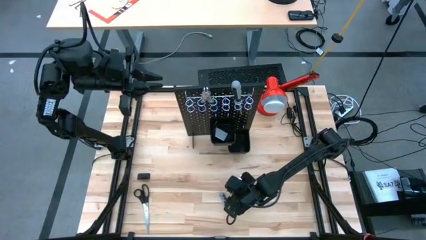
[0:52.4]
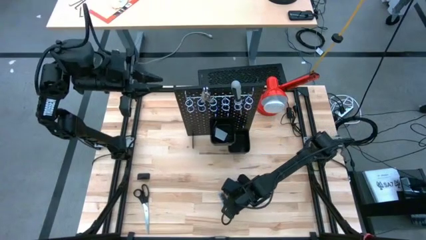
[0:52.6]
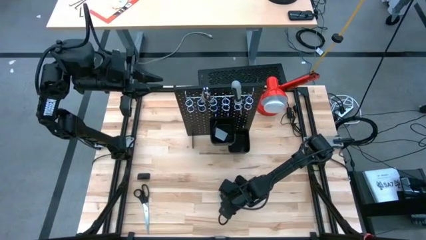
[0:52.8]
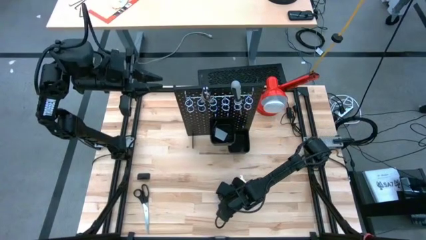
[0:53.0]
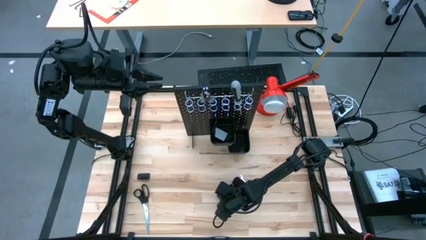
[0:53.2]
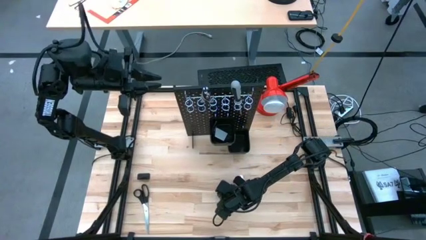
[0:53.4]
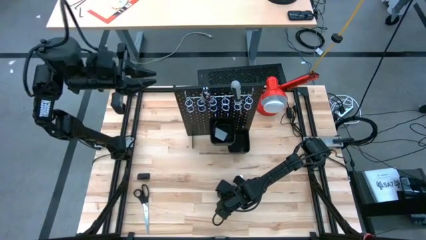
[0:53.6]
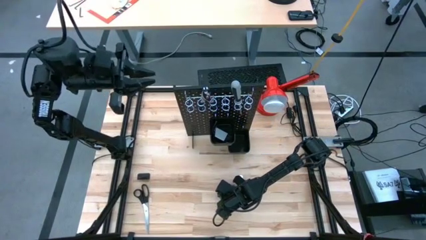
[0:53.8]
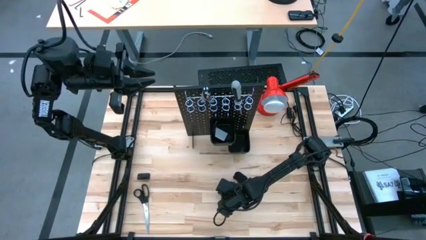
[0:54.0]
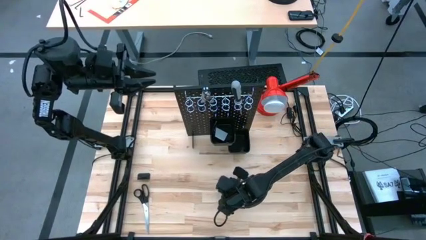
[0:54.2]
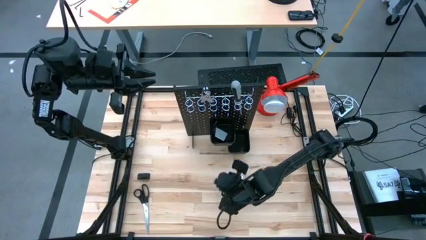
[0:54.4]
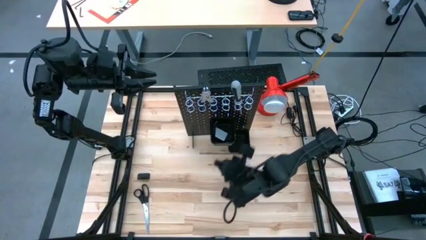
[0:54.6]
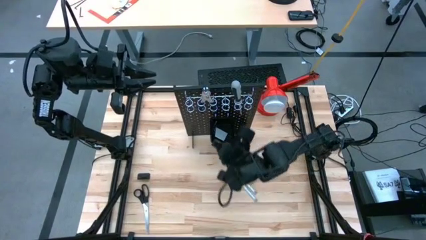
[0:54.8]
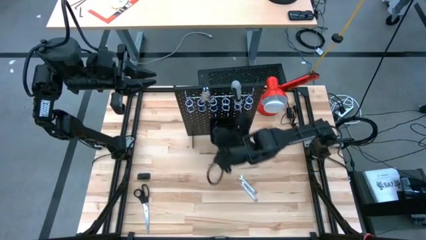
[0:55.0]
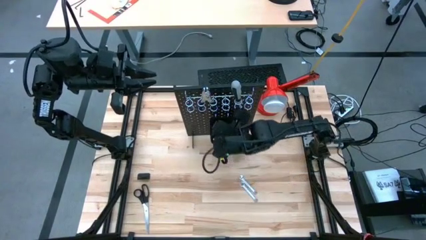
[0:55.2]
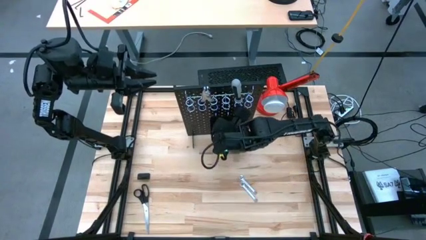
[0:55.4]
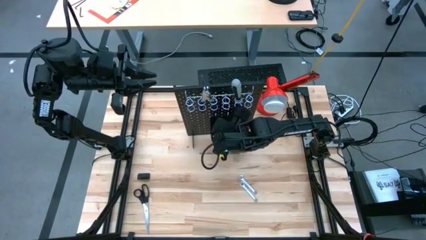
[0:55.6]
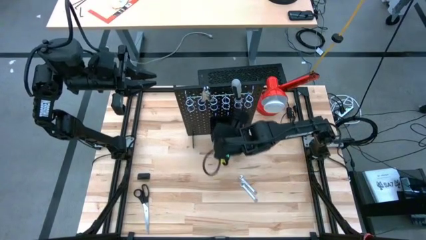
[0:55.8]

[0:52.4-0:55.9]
Task: Hang tools onto peg board
Put the whetstone into the black bin on the pegboard

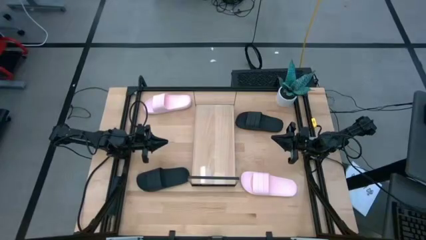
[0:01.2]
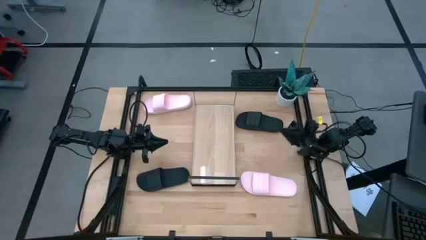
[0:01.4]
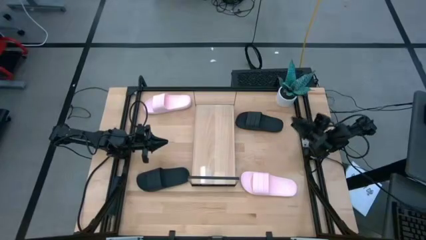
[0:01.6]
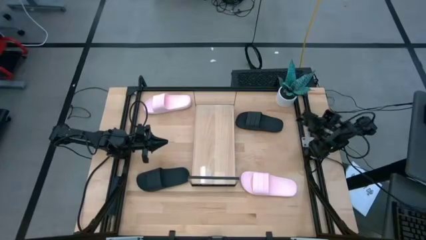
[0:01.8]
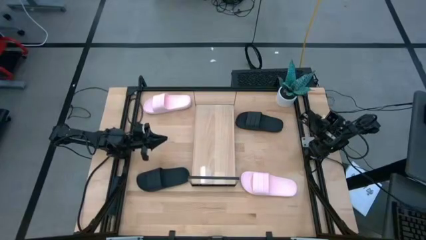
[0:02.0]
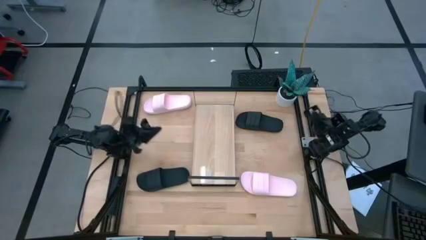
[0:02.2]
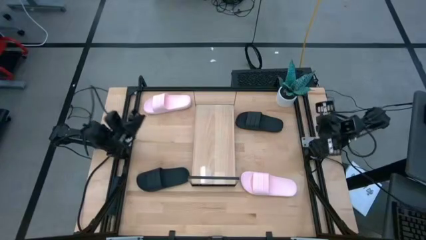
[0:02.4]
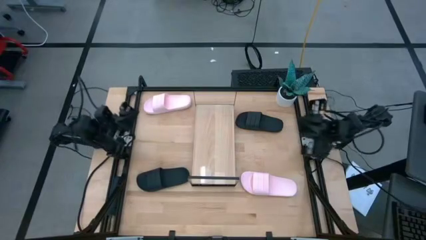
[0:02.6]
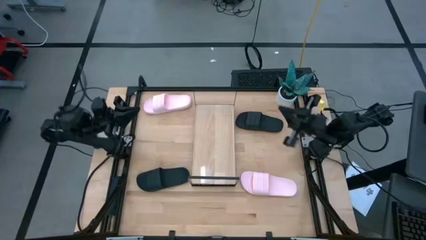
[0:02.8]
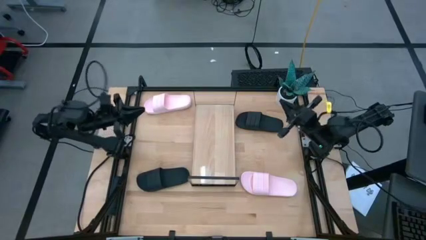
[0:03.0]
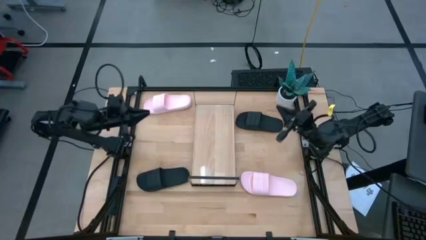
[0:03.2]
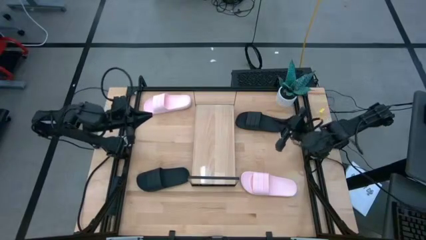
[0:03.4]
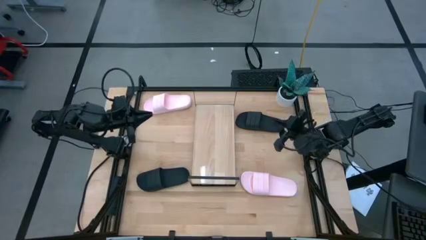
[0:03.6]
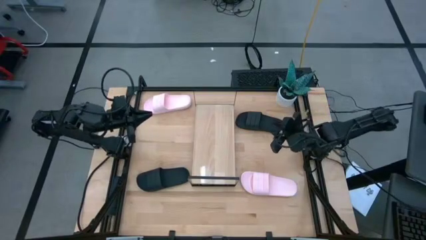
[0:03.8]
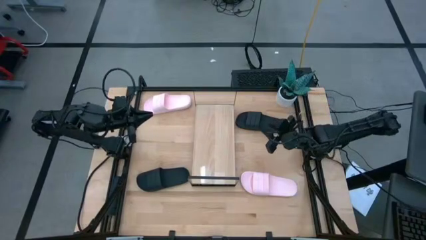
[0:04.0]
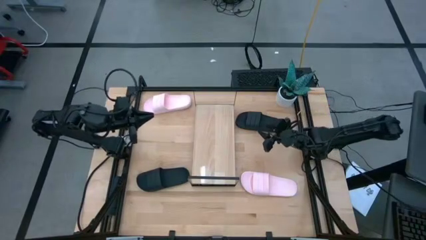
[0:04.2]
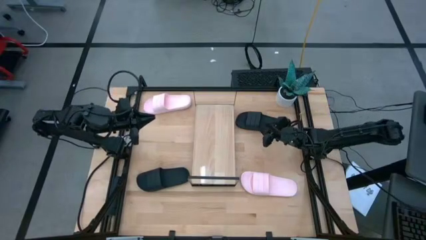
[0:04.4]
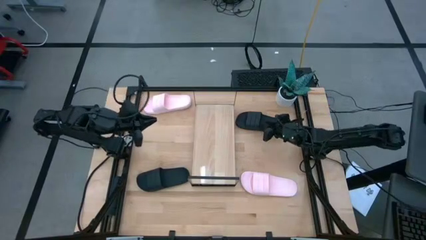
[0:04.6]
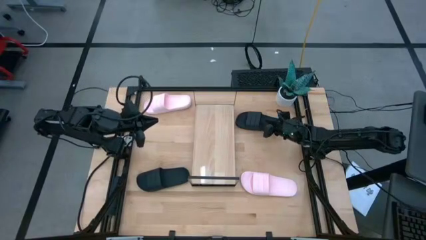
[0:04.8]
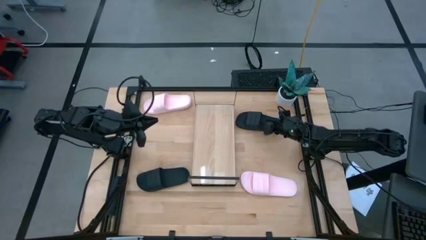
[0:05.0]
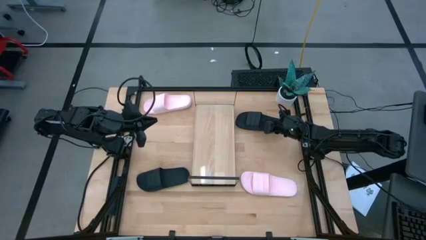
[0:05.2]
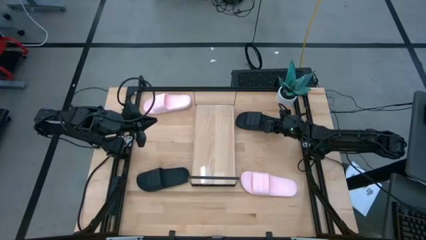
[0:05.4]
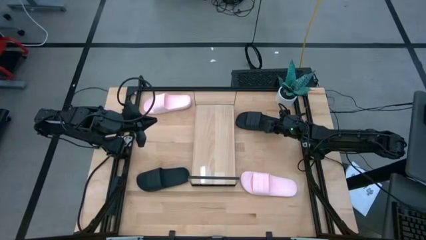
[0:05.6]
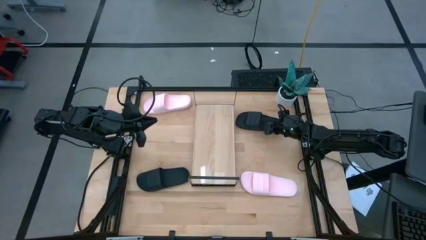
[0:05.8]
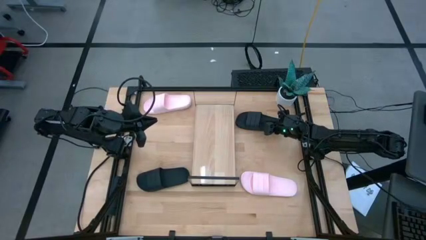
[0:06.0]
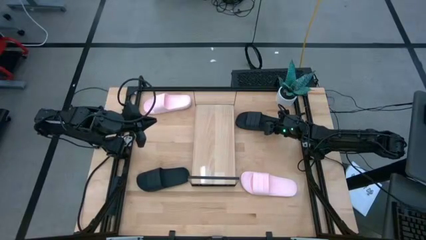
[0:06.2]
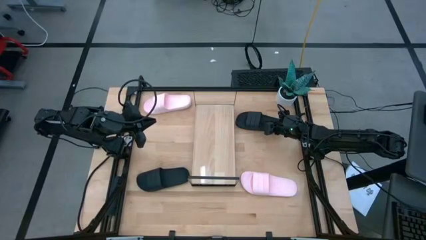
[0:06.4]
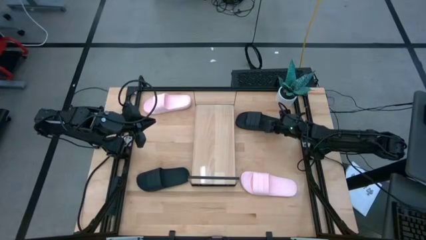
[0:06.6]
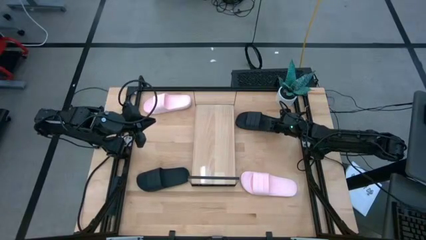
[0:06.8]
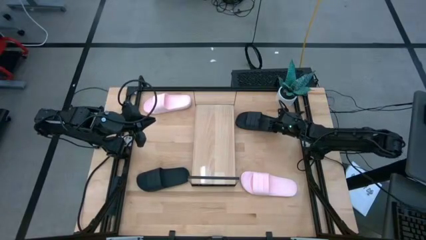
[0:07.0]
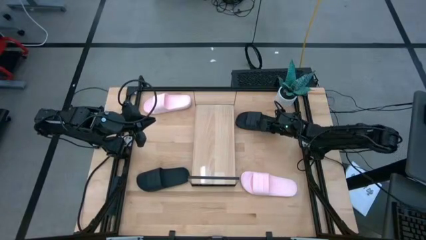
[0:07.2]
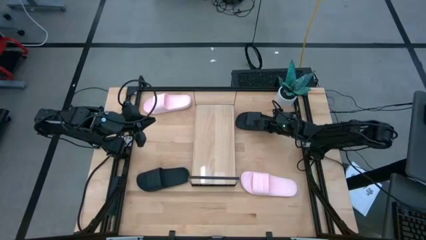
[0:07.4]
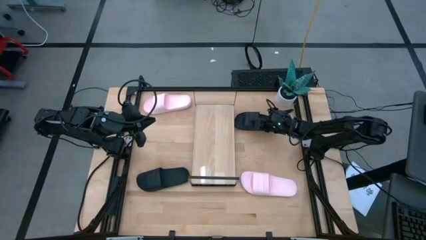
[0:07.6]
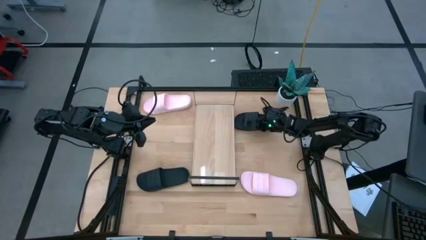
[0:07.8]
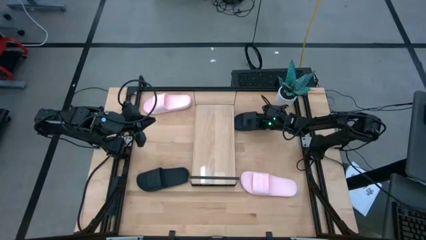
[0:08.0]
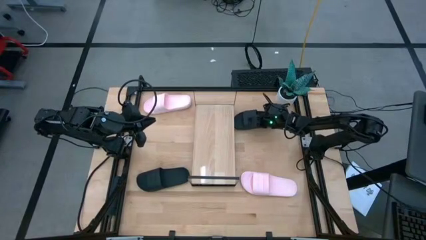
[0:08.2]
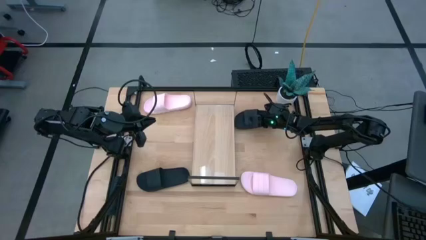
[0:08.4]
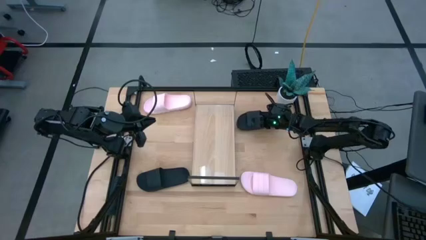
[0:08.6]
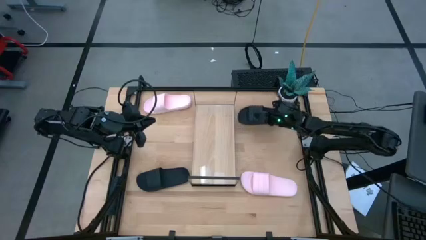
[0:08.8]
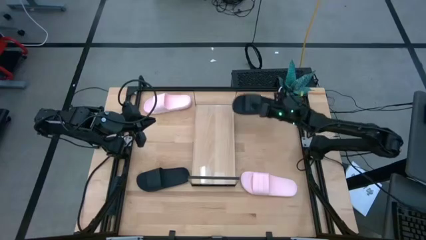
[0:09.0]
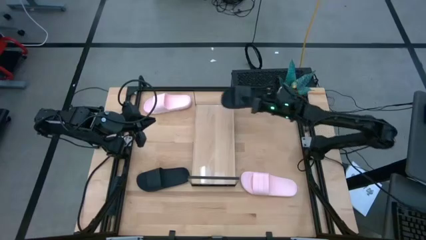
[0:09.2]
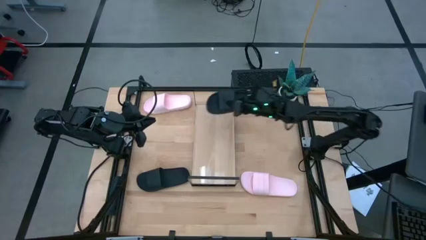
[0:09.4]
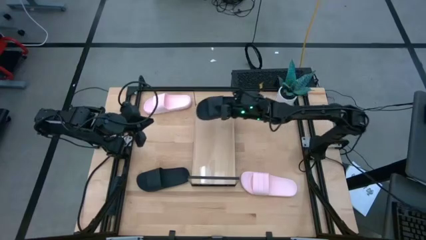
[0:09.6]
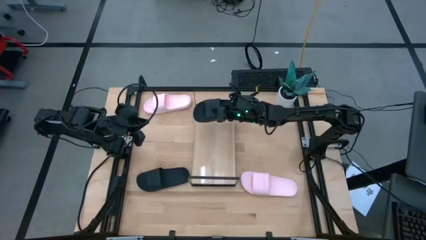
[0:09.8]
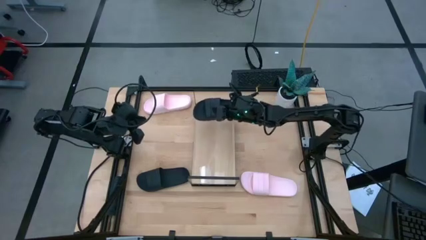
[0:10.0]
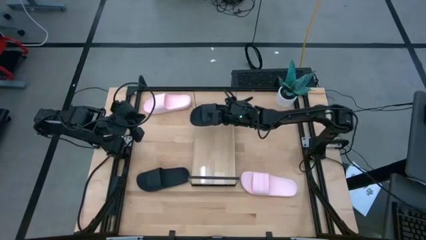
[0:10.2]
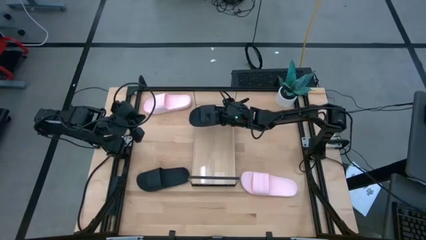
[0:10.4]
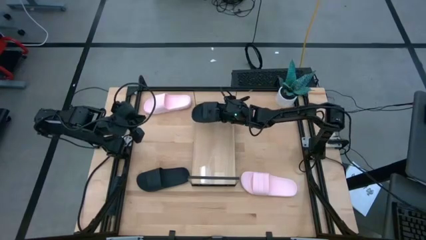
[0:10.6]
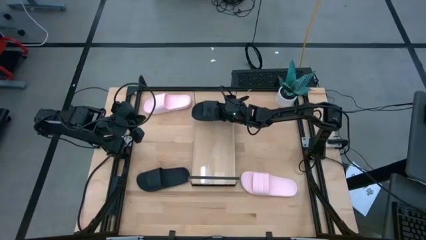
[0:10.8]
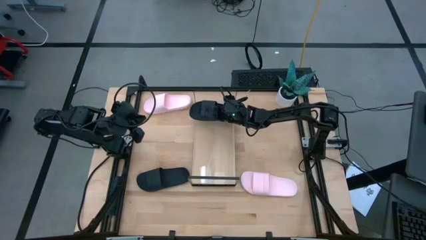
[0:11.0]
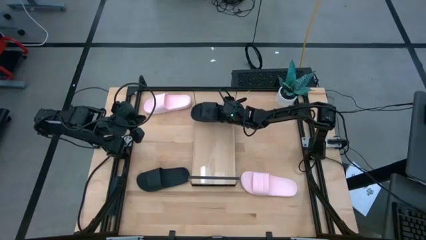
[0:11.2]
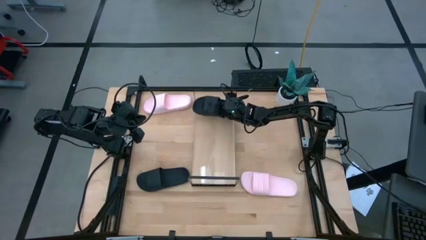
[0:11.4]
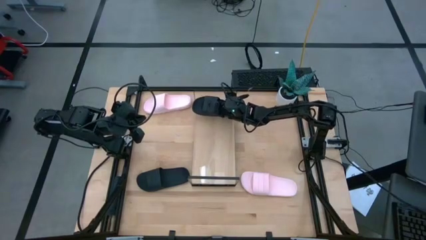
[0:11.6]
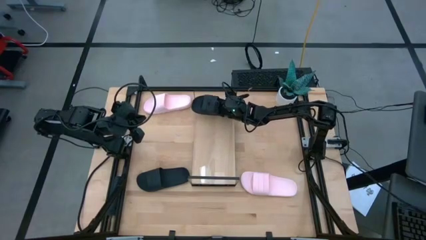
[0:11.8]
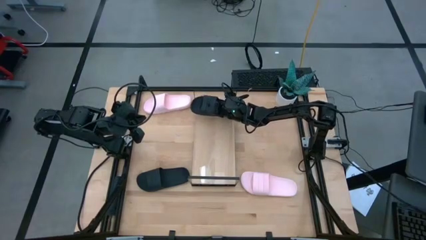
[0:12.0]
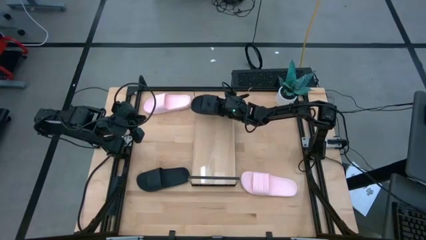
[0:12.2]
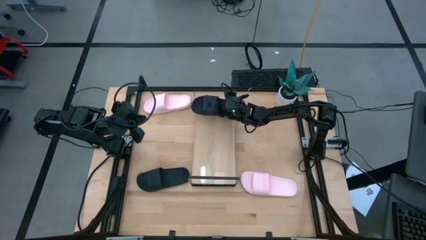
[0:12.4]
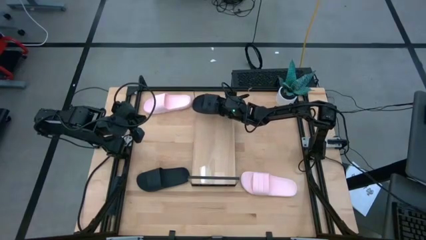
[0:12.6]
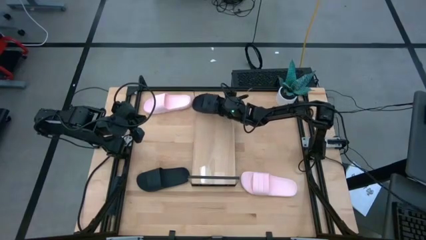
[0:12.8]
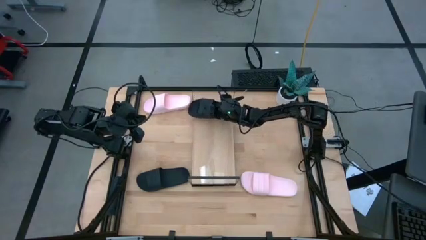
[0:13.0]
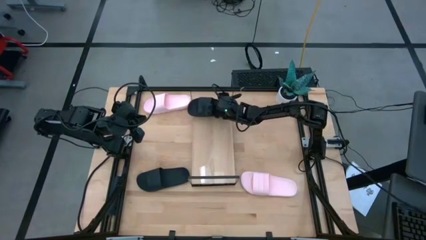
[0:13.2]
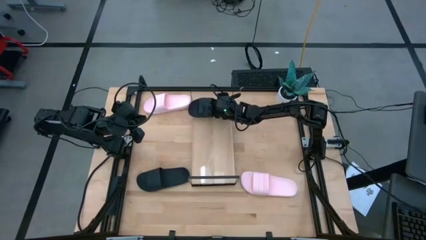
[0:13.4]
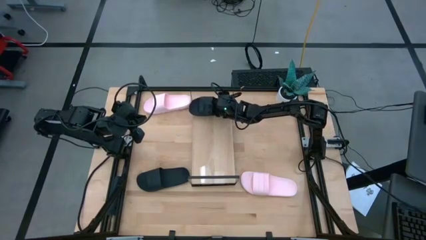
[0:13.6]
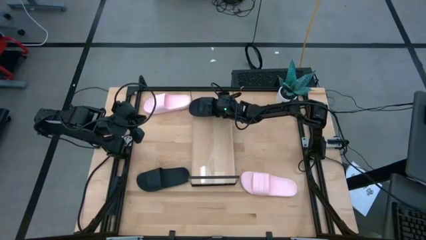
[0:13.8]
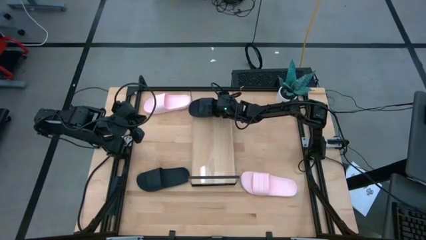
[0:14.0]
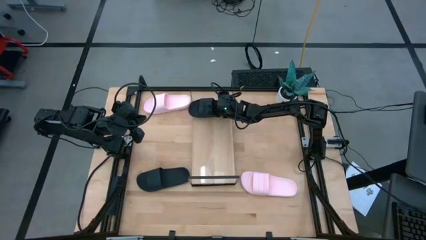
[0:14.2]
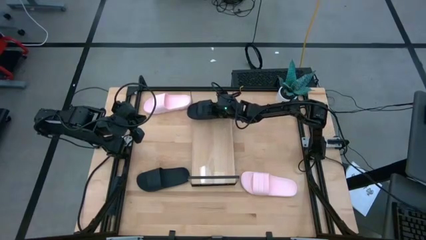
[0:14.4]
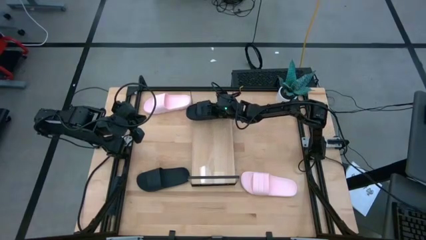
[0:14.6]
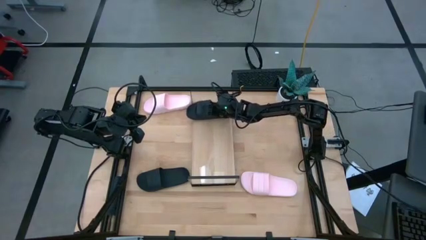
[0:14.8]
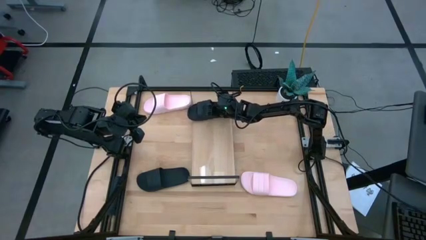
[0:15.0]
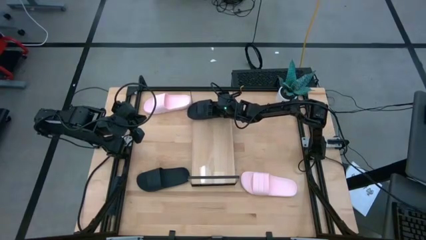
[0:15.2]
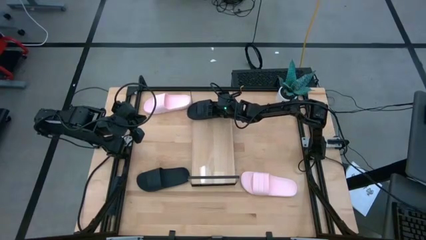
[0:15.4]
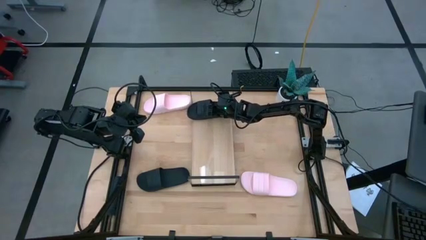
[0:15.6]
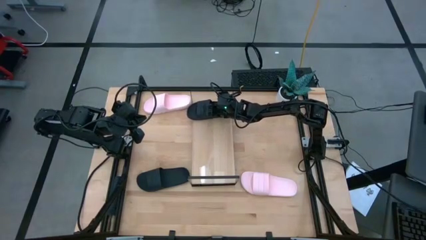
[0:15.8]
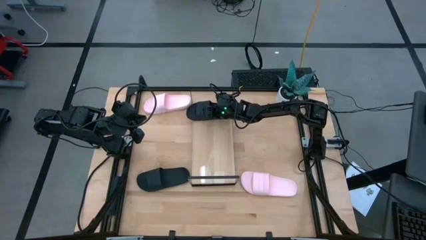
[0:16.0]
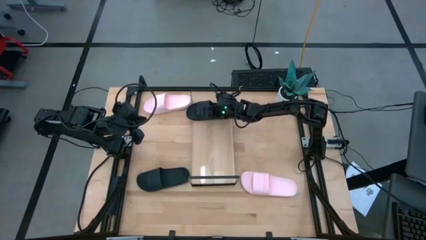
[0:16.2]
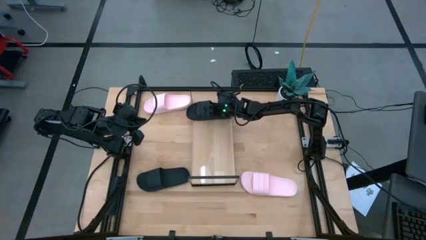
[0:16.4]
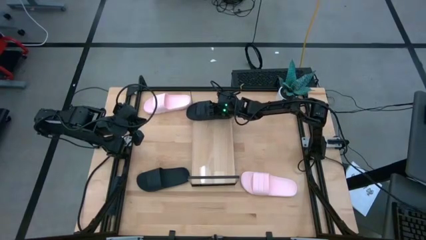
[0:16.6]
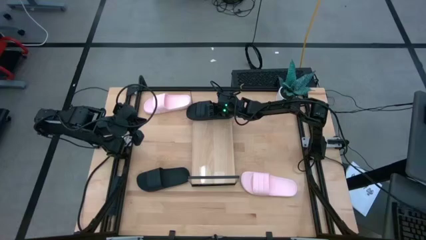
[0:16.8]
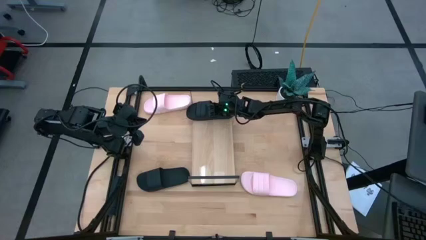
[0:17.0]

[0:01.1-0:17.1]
Task: Pick and place slides into the shelf
Put the top black slipper on the shelf
